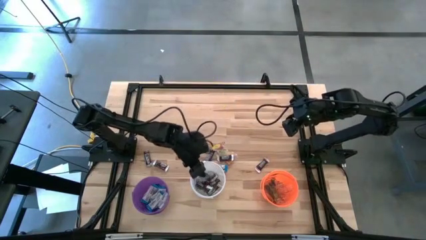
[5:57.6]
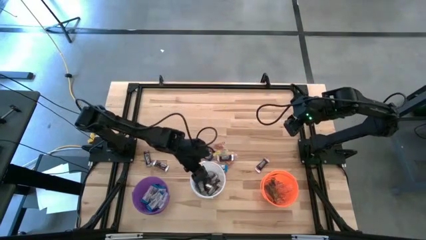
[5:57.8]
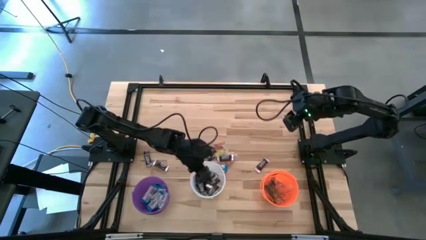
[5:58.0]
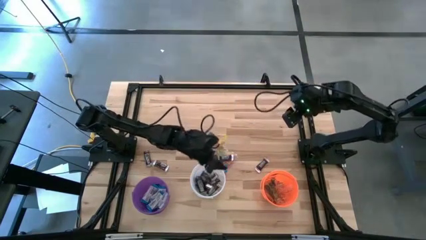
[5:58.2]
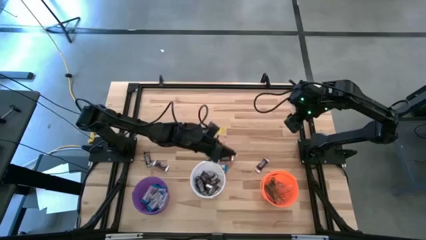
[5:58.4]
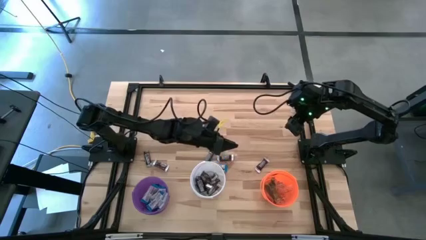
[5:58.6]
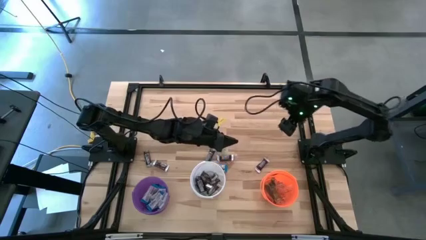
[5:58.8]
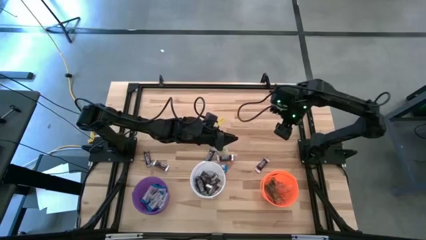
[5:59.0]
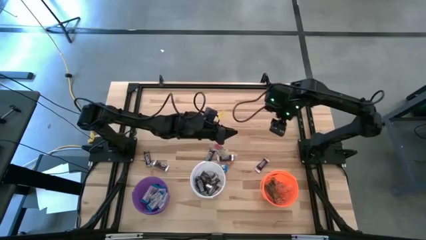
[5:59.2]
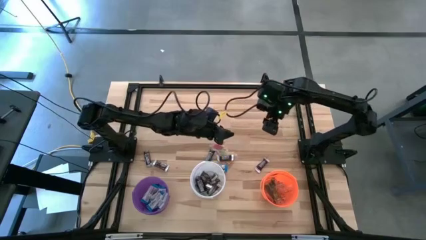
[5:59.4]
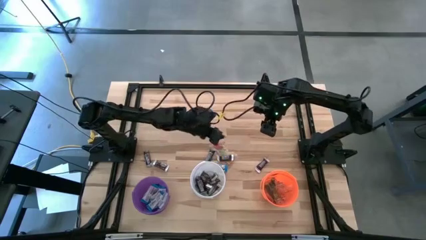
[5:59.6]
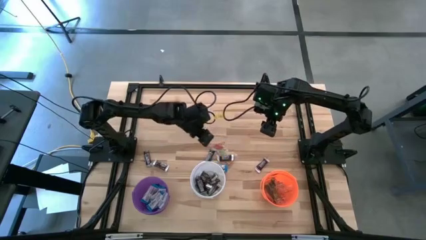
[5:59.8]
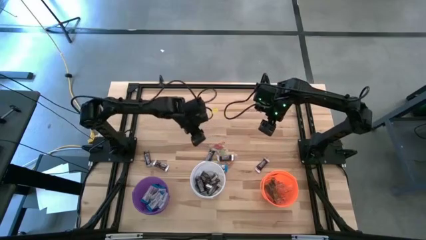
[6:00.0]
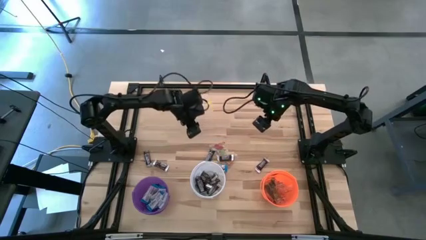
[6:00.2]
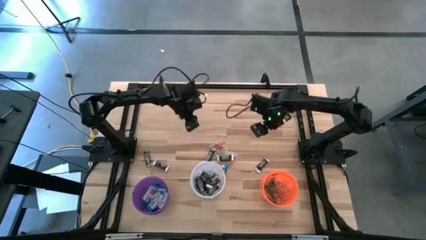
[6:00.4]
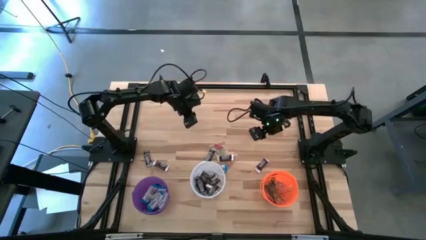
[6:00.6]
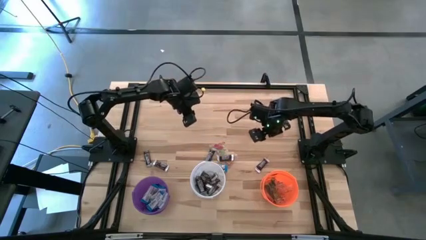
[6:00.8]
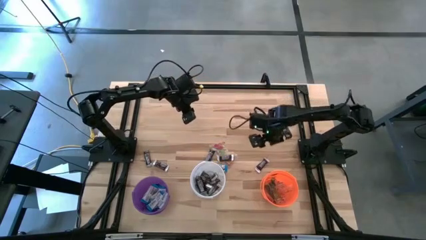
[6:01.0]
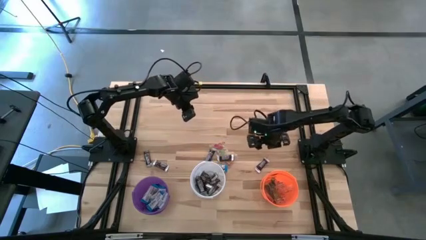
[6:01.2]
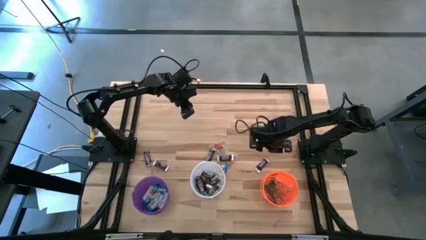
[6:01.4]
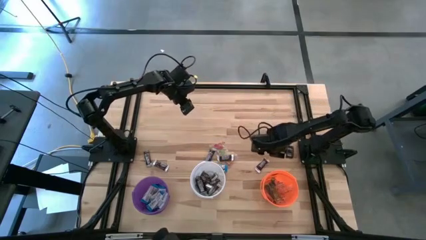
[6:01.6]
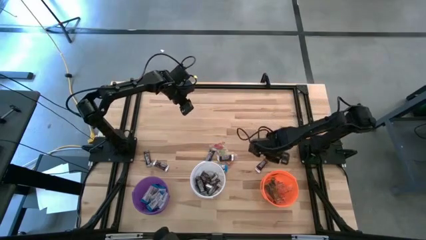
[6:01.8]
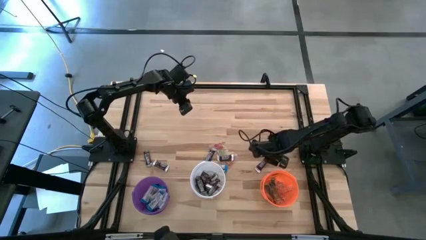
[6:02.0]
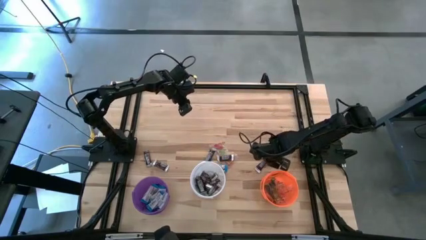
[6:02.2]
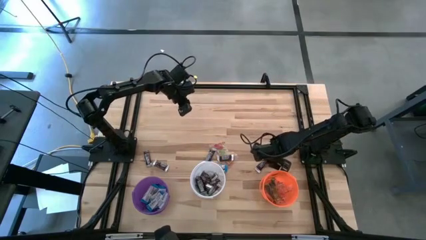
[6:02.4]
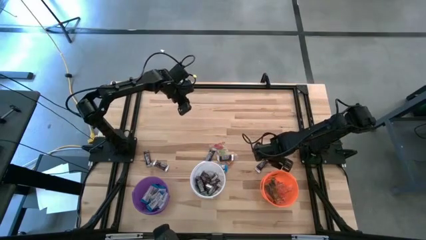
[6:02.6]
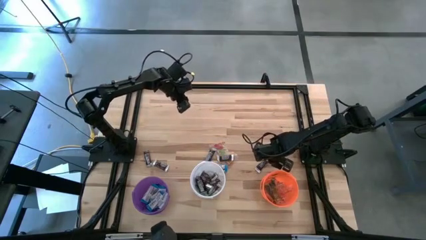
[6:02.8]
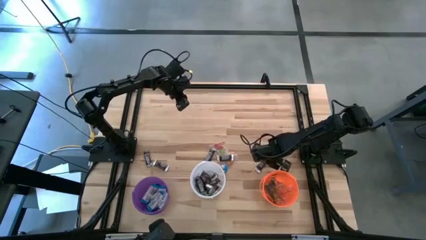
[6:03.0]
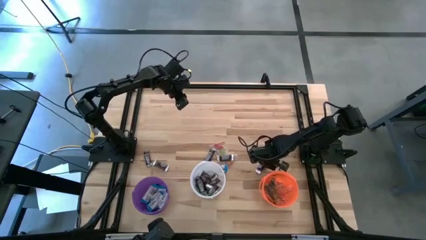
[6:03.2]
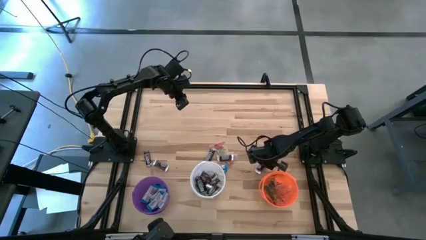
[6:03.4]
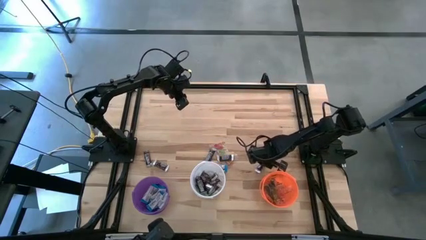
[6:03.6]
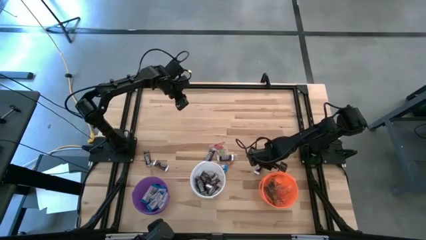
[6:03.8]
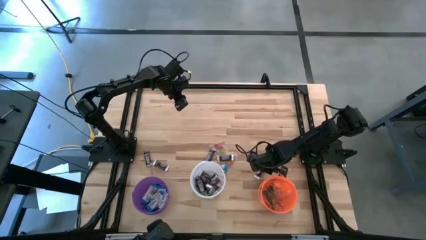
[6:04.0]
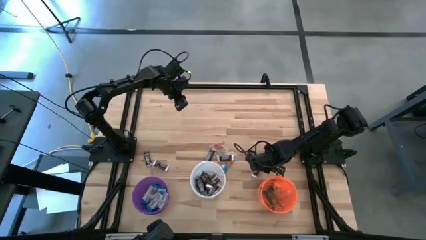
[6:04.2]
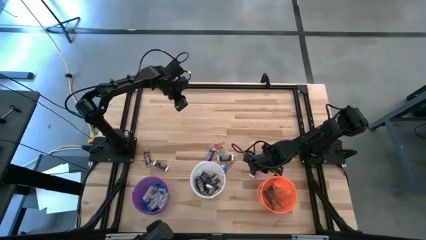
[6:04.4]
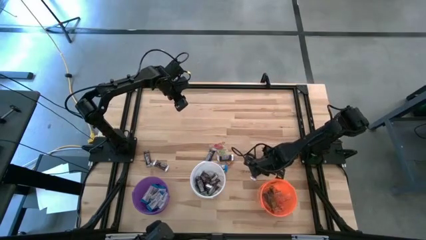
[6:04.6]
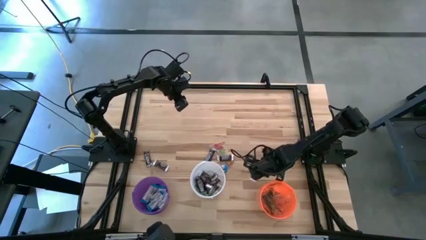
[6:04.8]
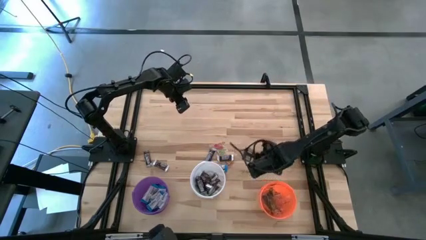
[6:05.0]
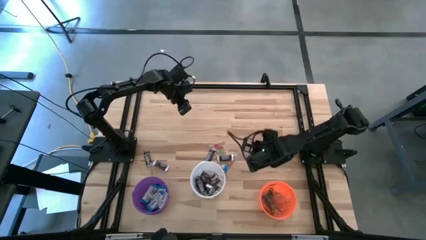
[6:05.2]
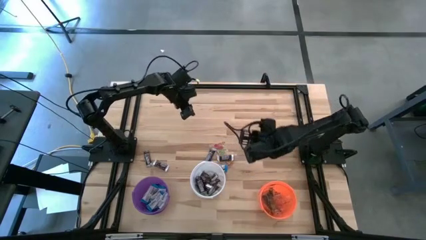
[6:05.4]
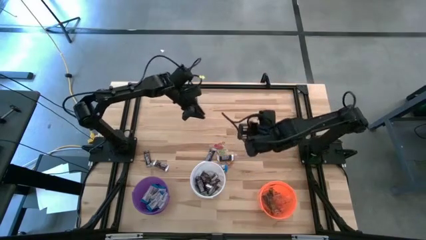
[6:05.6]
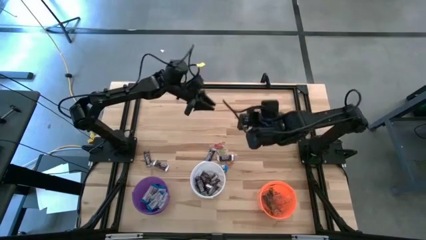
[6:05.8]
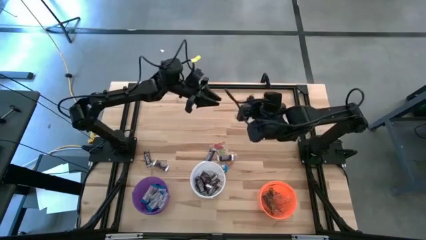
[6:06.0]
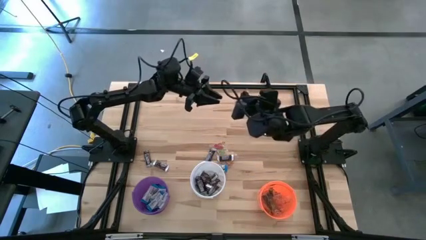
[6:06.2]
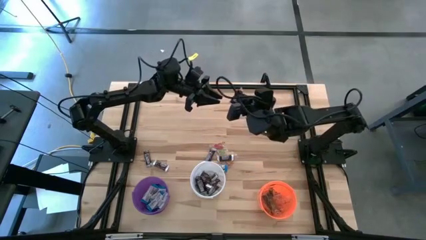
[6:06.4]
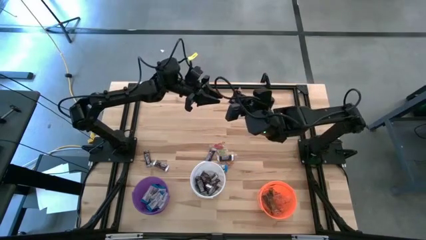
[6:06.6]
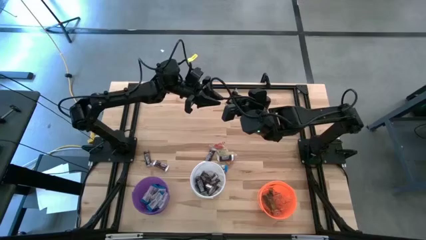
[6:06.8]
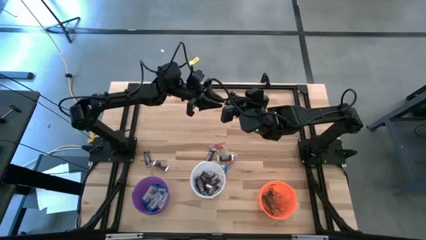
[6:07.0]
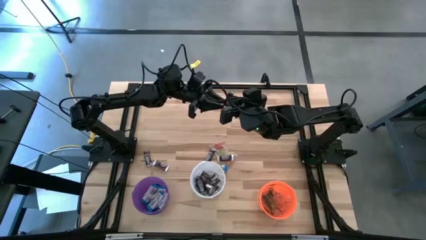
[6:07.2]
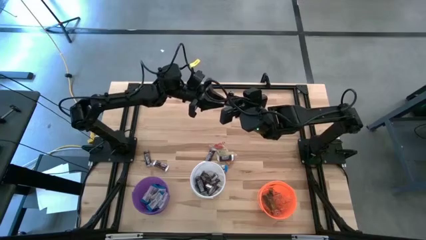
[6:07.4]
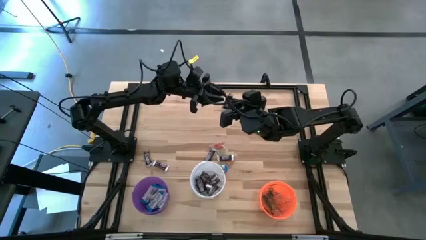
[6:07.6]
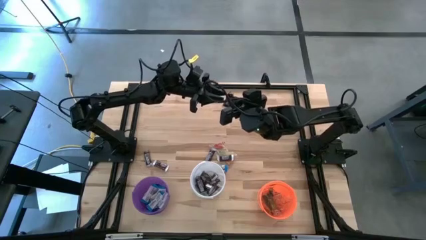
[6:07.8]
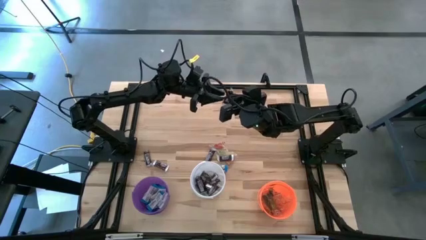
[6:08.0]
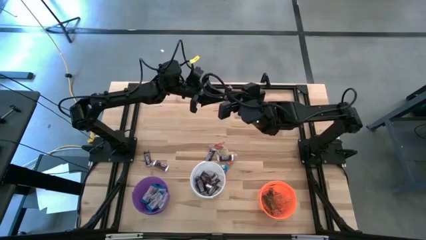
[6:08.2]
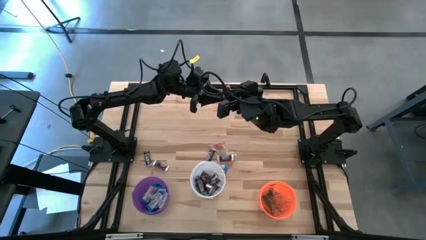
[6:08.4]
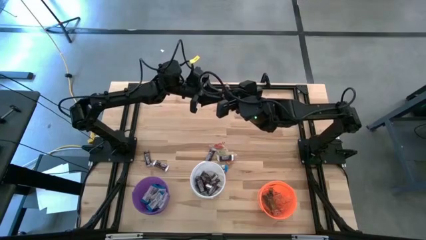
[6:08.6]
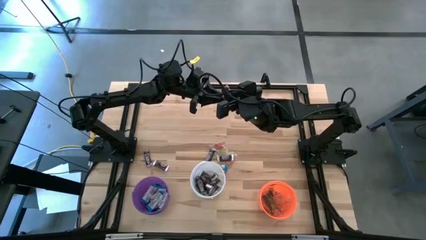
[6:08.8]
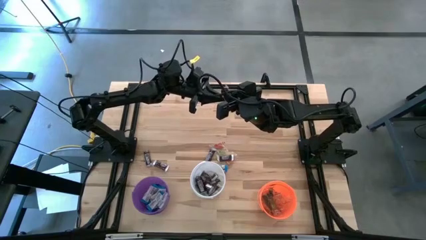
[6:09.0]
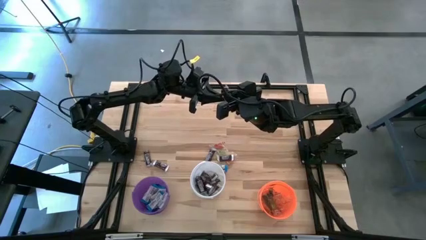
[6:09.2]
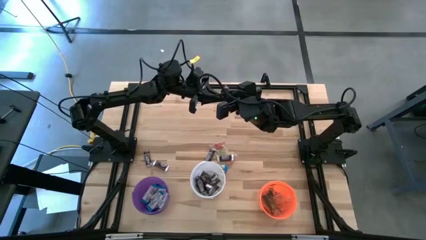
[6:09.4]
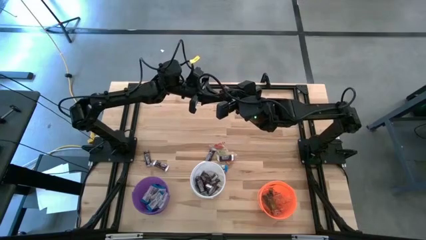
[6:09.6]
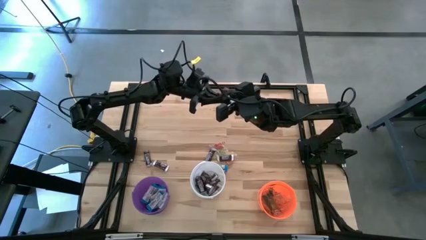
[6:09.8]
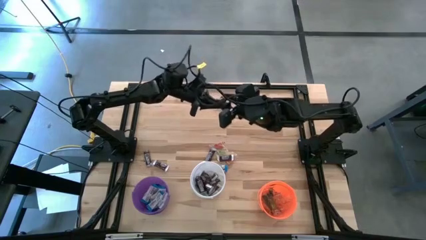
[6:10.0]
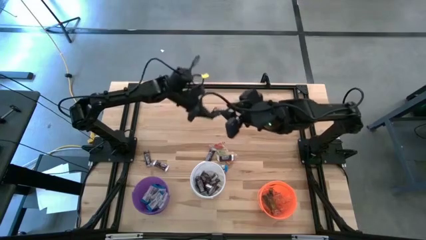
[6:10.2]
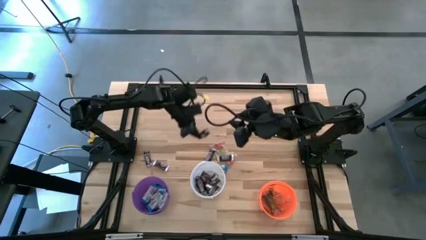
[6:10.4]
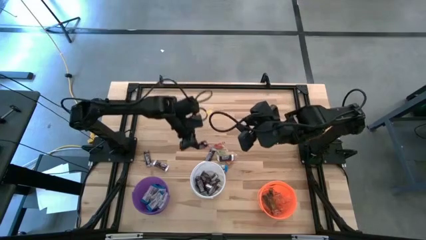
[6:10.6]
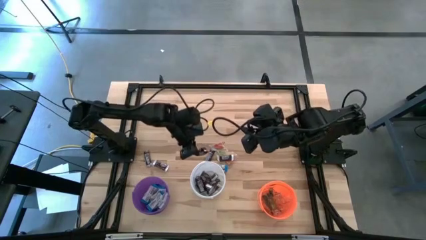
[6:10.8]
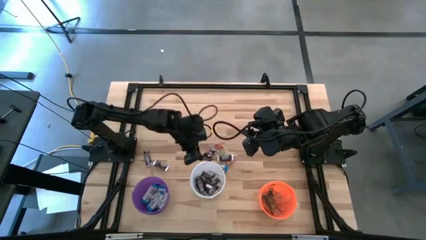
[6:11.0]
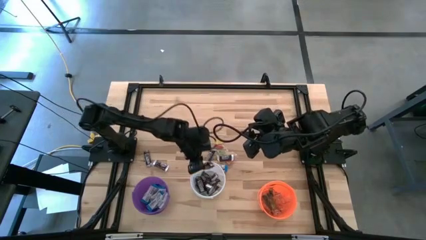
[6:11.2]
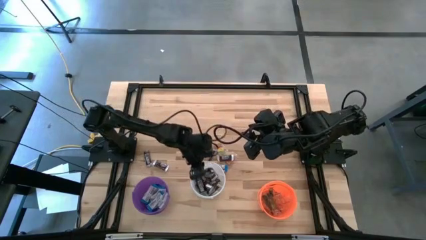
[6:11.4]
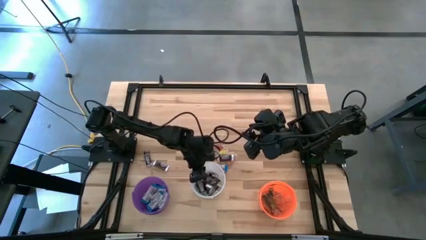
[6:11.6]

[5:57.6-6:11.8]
Task: Sort candy
Put the brown chocolate into the white bucket
